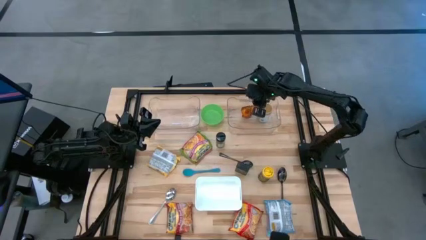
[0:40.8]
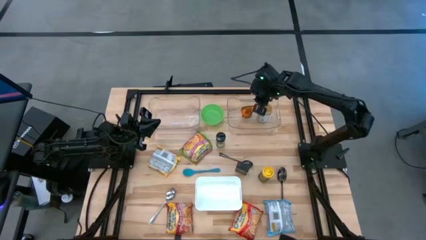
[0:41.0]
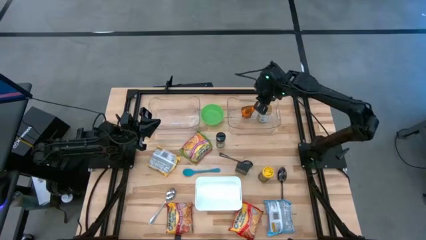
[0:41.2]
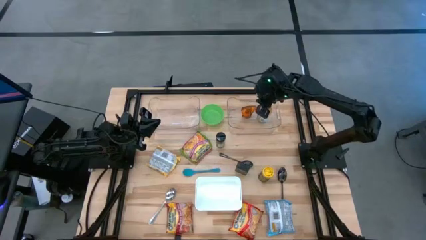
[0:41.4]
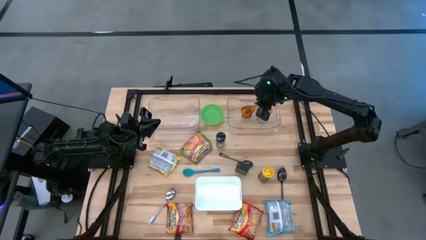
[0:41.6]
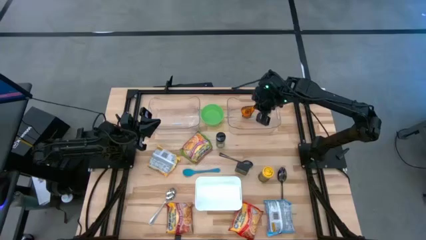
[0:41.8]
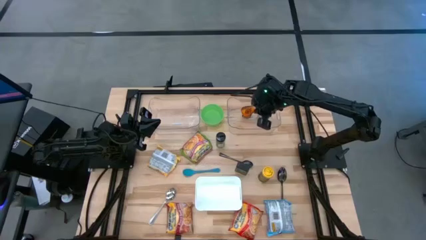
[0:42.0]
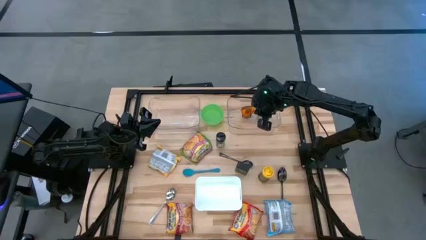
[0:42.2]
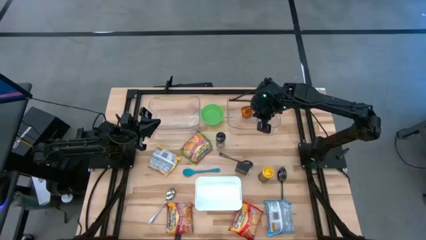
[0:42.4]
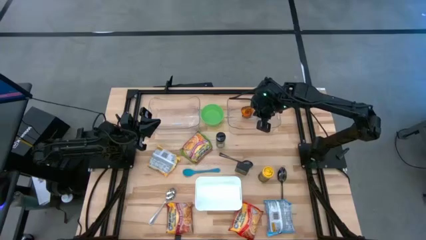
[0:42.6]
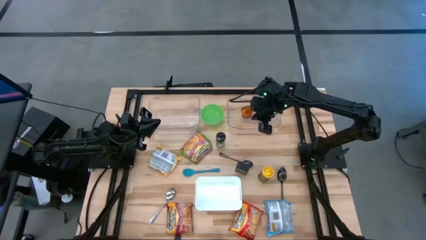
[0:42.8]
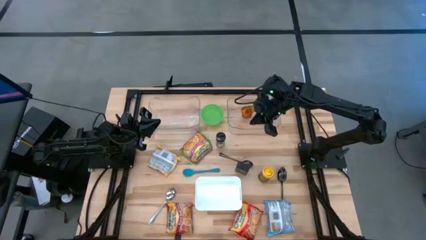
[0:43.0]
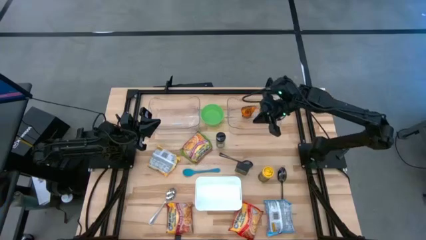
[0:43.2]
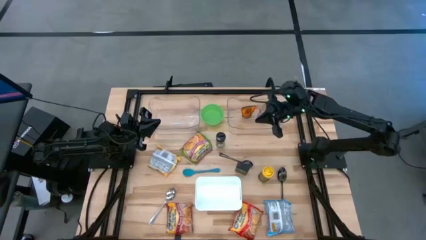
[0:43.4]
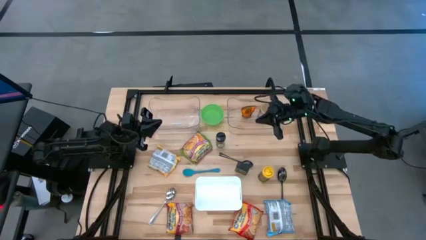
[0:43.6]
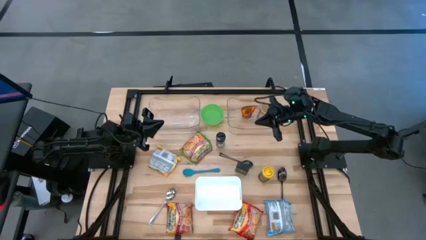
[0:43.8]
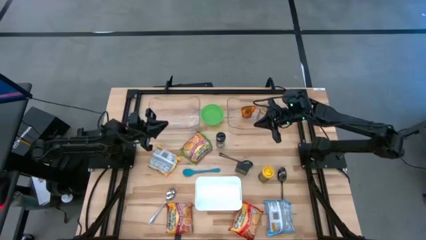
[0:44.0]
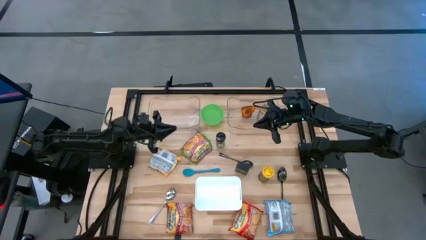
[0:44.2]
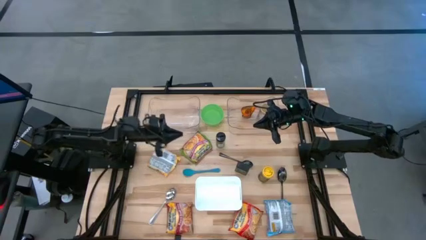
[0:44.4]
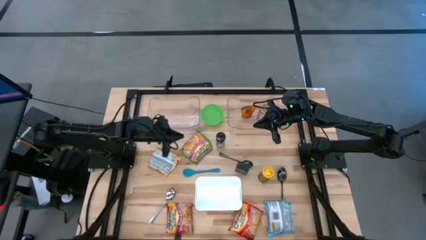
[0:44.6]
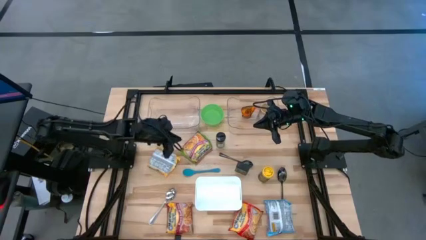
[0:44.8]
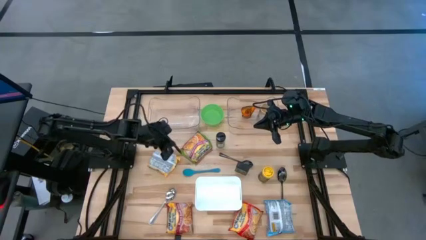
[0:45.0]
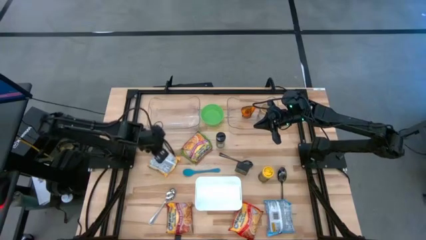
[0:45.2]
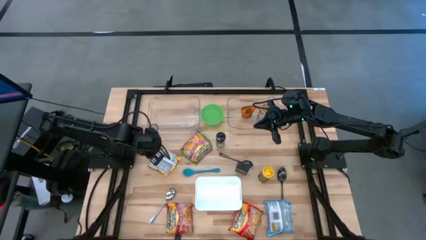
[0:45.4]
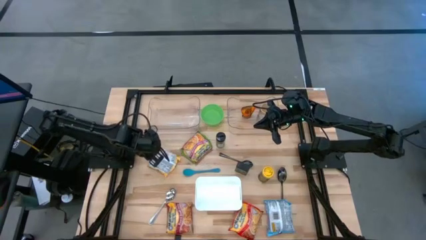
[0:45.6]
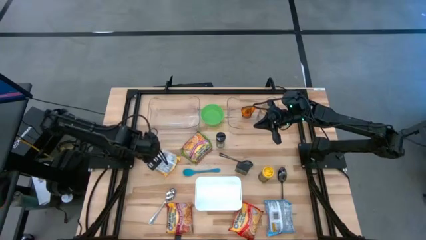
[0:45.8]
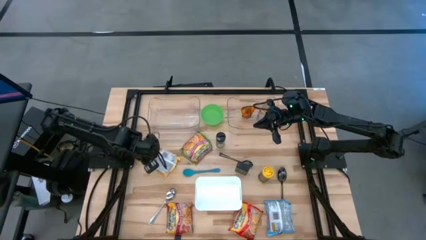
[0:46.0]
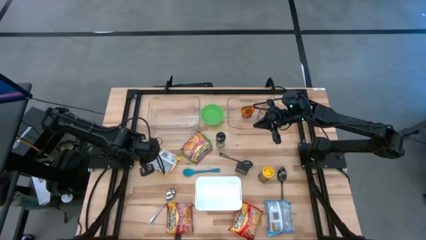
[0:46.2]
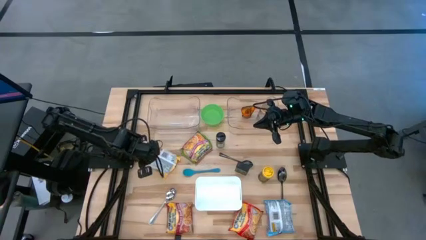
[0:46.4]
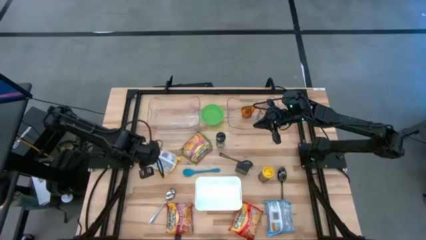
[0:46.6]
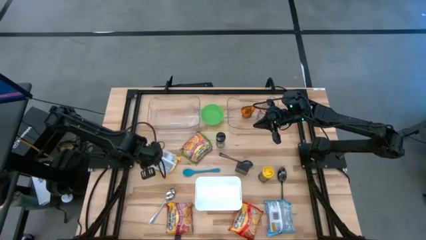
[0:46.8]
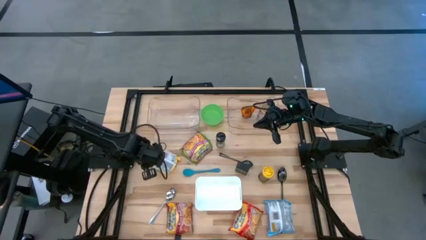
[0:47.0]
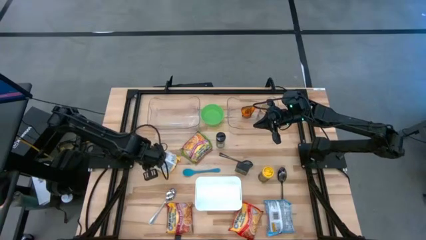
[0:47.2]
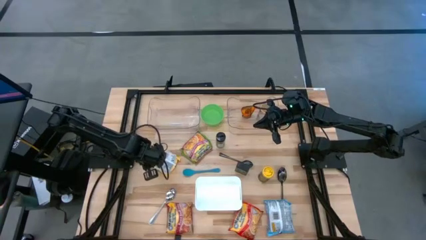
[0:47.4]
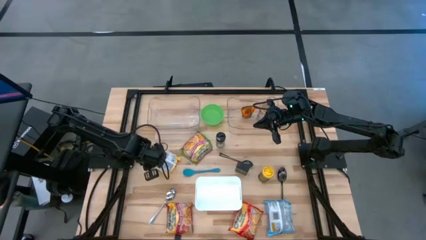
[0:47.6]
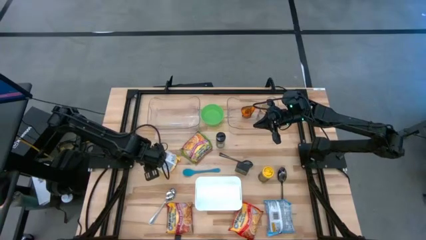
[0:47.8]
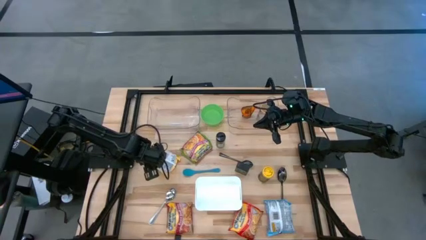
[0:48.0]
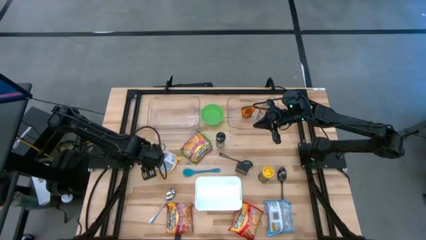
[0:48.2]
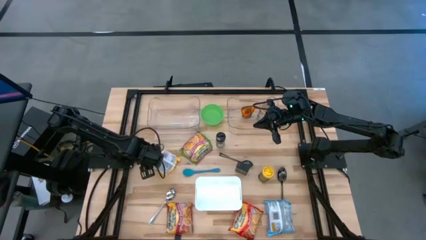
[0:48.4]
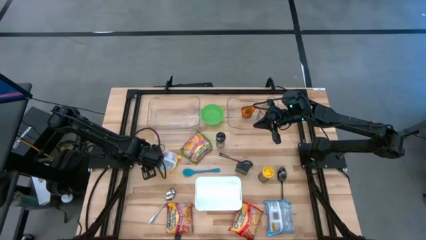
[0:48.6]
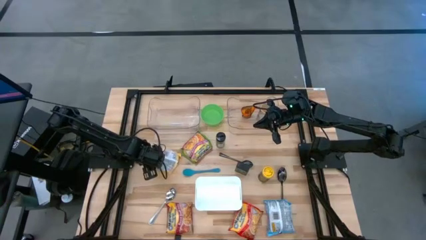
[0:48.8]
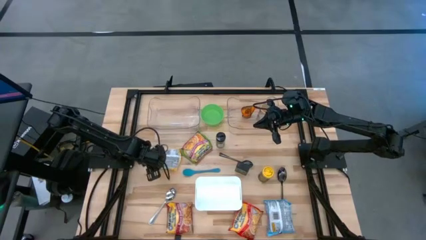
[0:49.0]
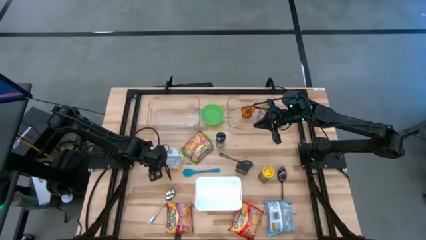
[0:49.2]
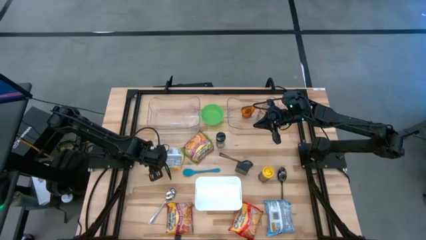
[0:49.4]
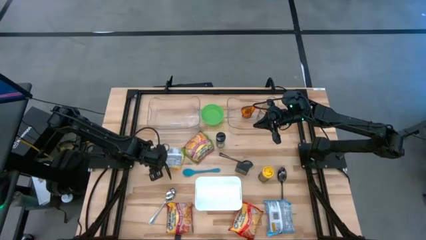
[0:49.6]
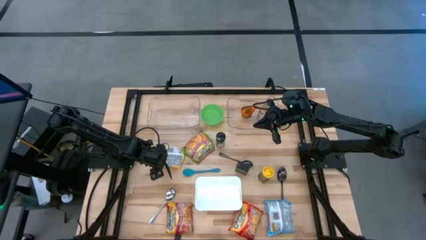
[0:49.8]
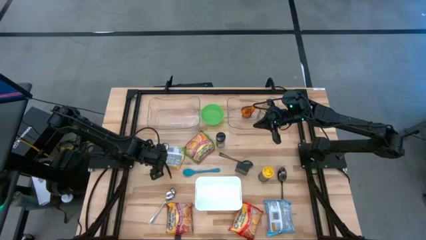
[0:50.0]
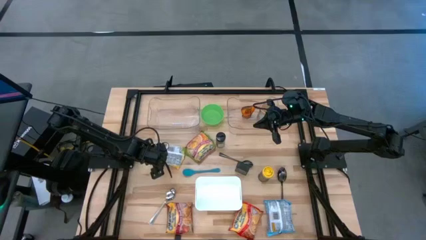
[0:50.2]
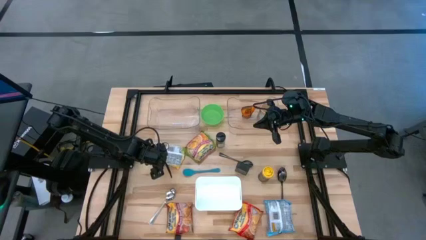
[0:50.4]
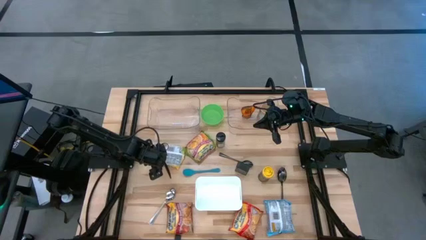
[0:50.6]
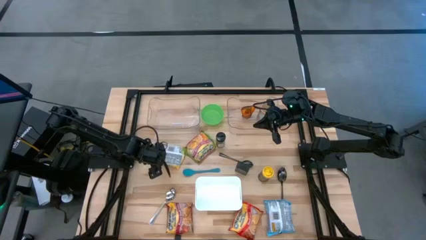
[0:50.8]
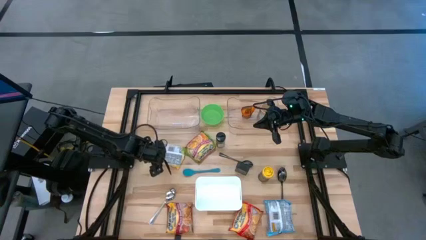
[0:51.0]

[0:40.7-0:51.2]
Task: Pick & Place Food Item
Put the yellow noodle pack into the left transparent bin
